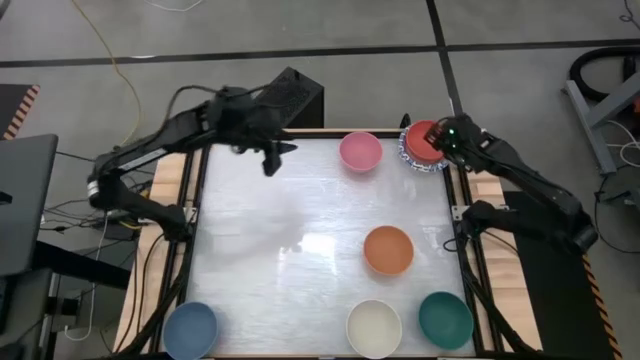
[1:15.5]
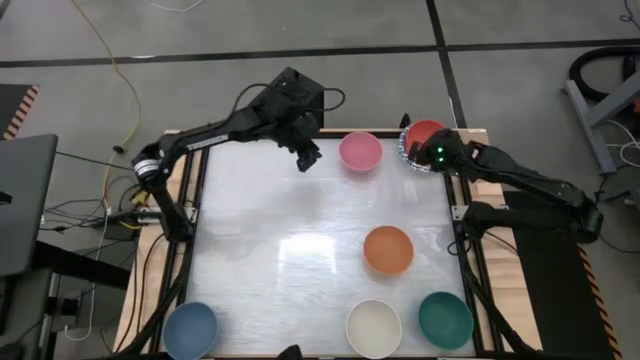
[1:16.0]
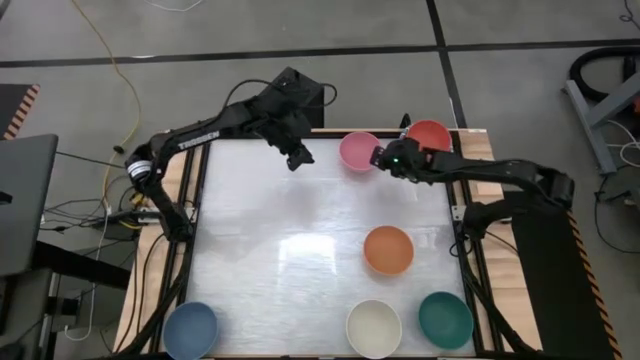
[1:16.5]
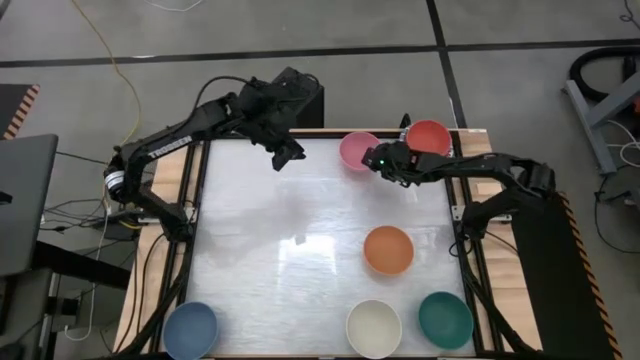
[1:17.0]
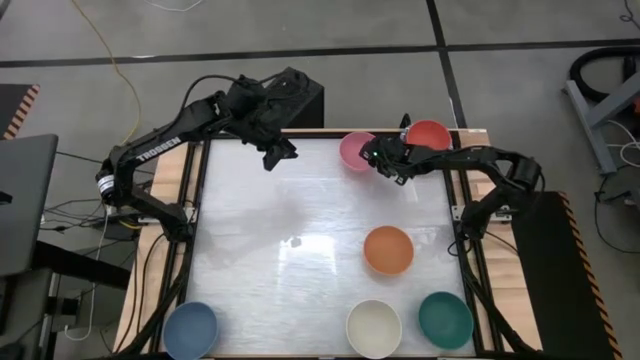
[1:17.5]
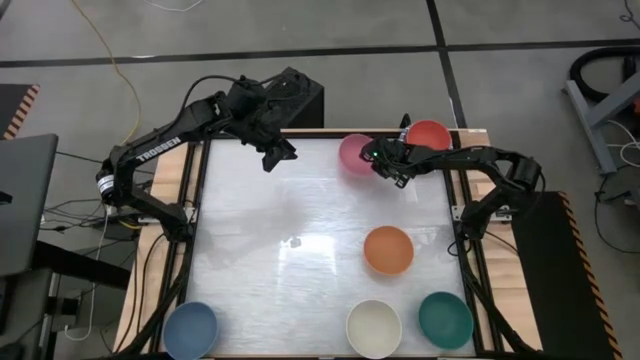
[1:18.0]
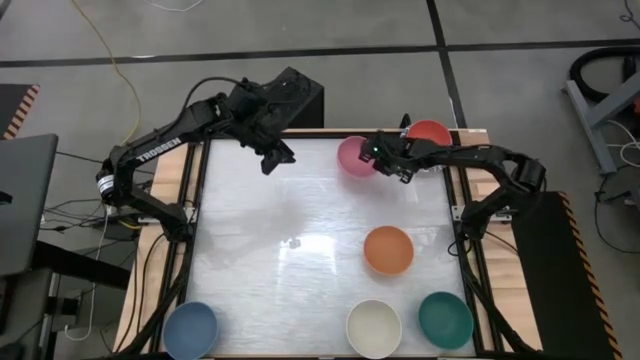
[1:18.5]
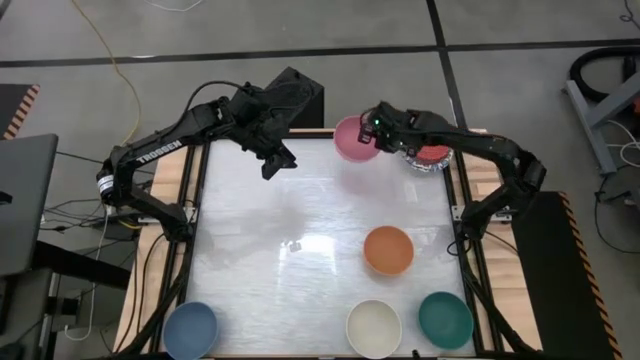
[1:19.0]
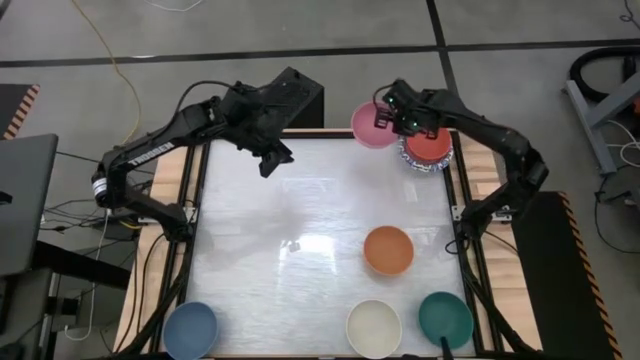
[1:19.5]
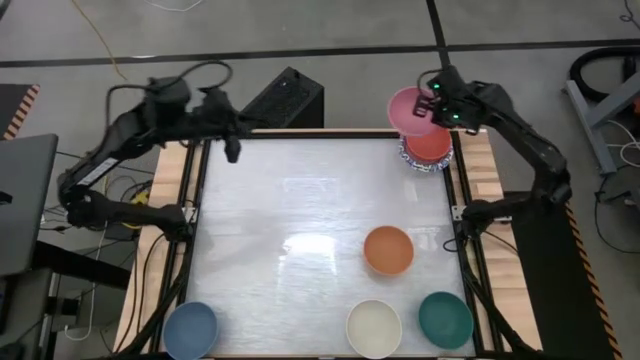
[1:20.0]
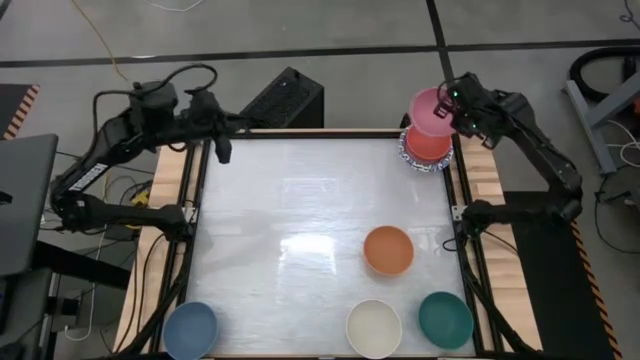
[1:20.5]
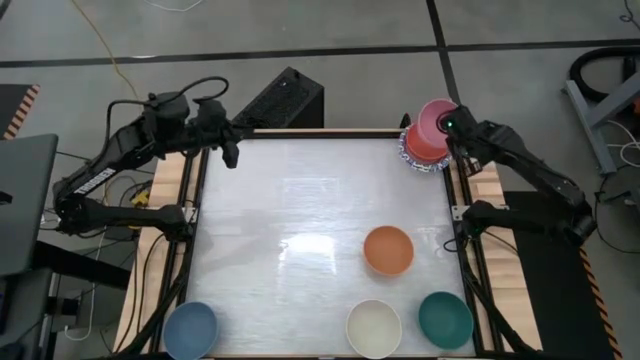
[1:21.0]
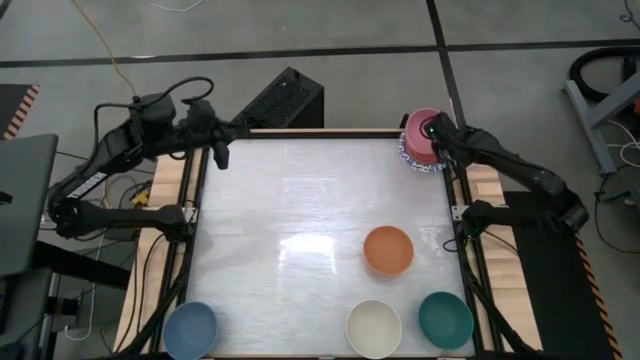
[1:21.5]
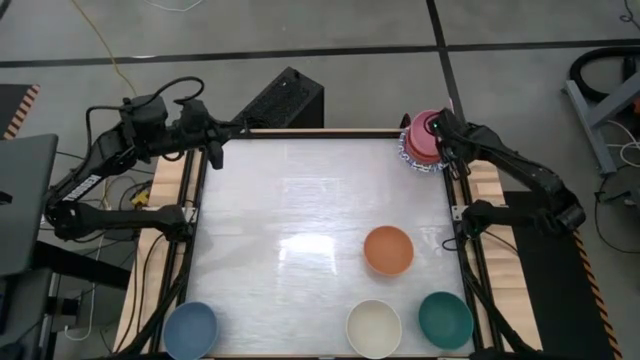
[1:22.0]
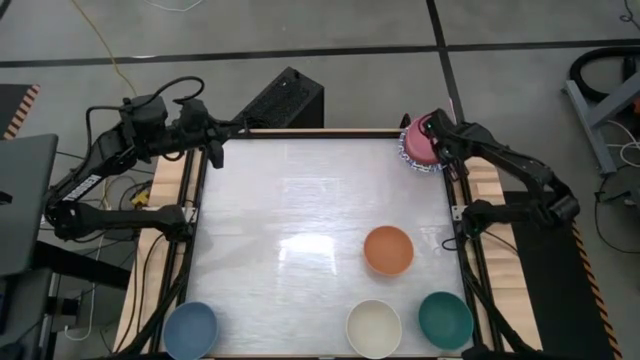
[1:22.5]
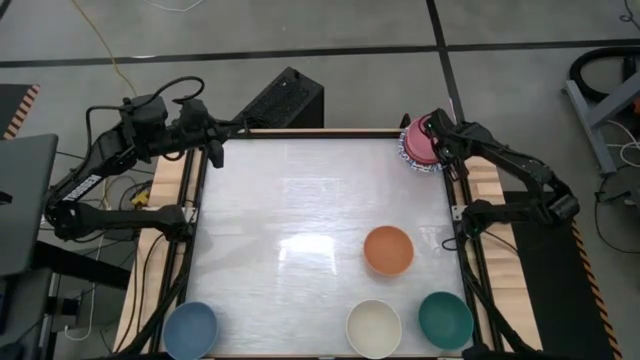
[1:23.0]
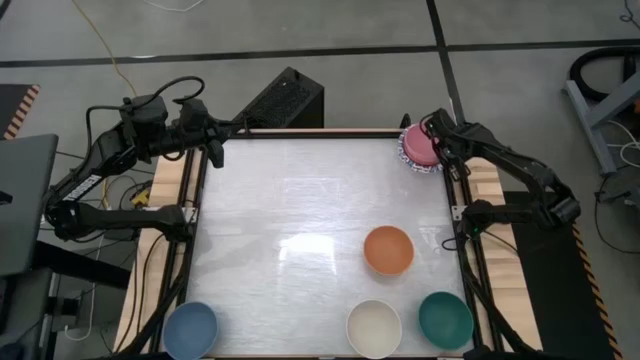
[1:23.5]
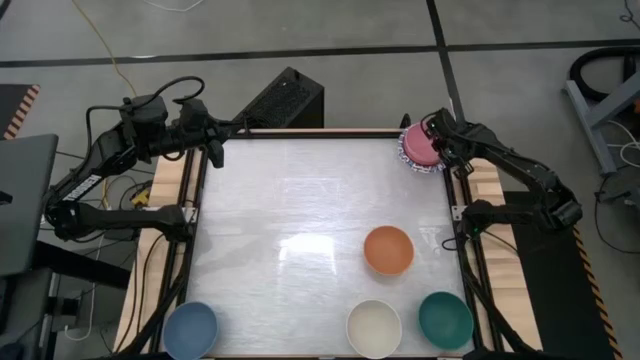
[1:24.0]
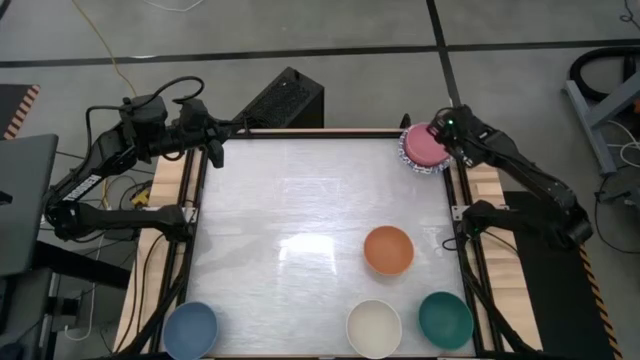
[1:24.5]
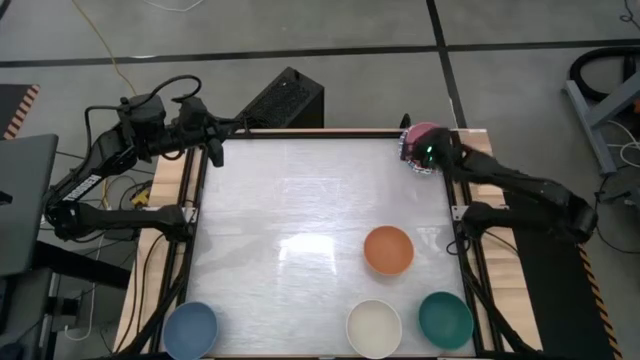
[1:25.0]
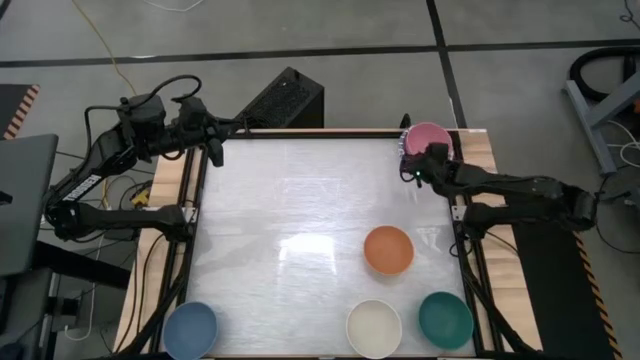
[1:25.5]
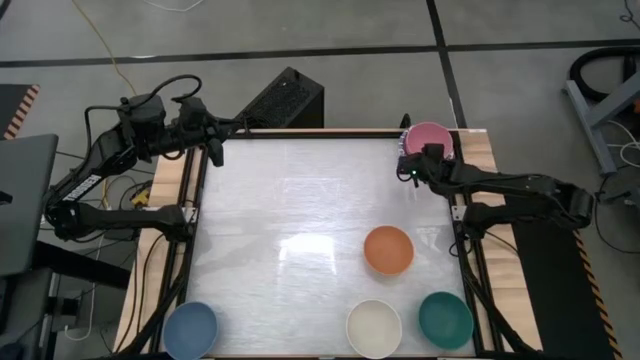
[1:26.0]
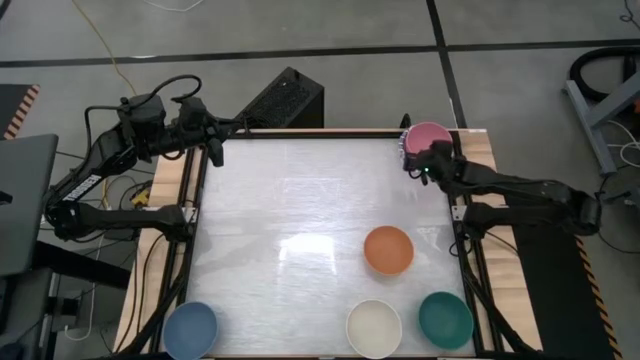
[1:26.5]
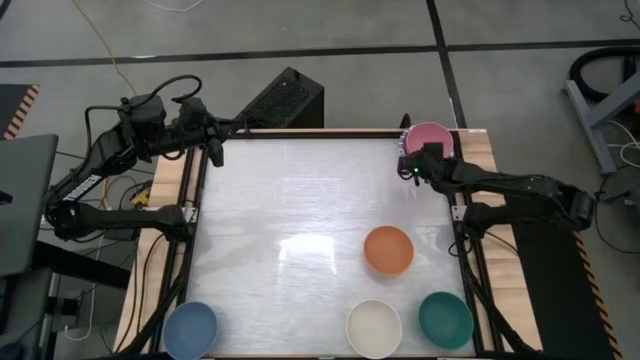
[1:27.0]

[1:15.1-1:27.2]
Stack the pink bowl on top of the orange bowl

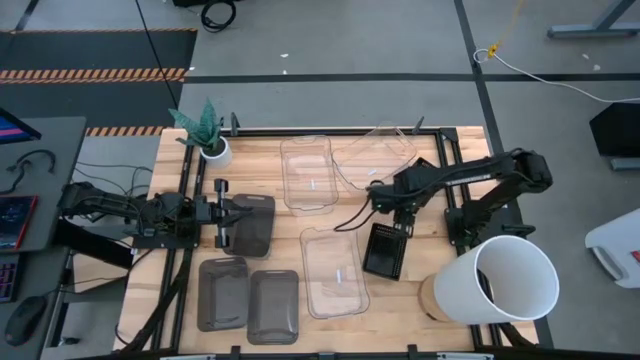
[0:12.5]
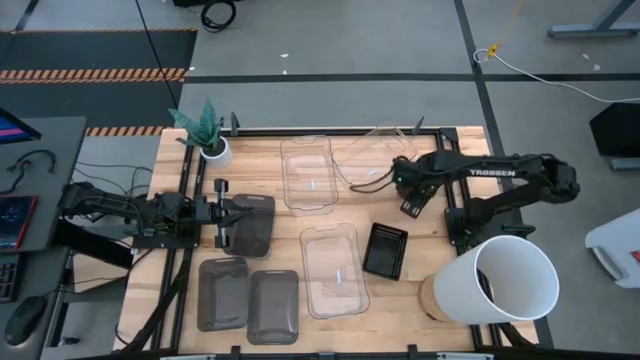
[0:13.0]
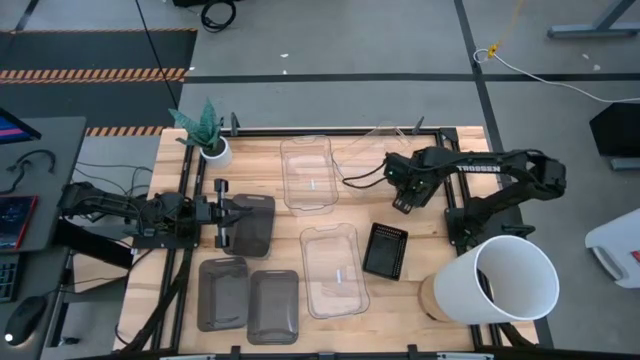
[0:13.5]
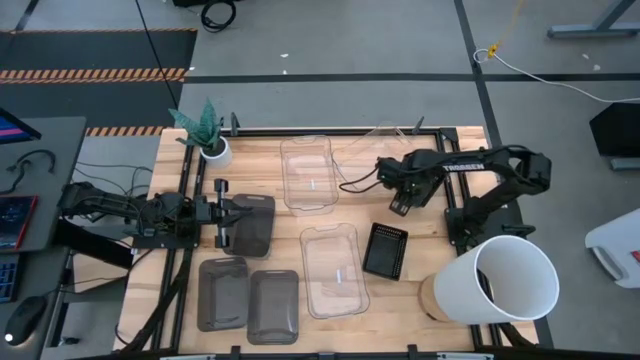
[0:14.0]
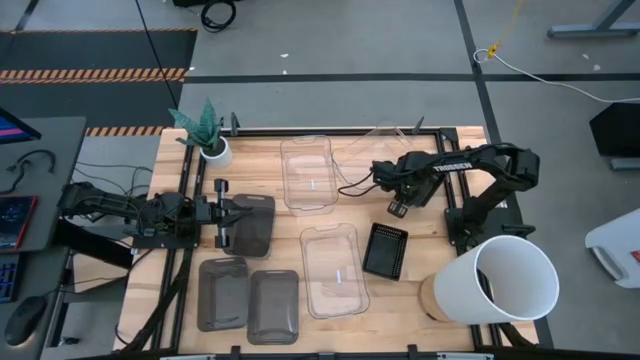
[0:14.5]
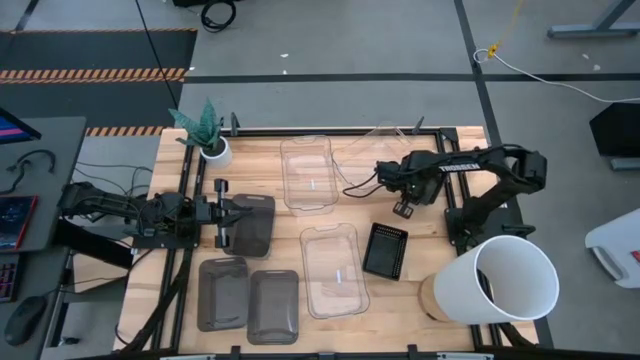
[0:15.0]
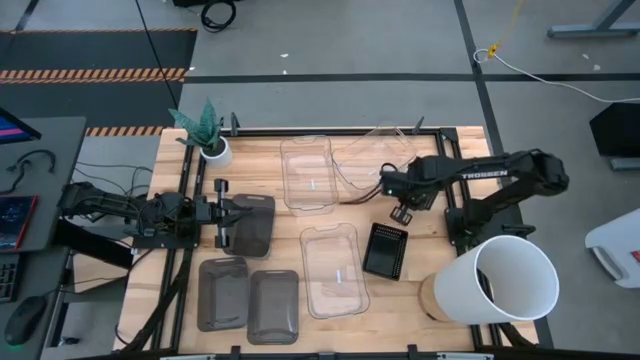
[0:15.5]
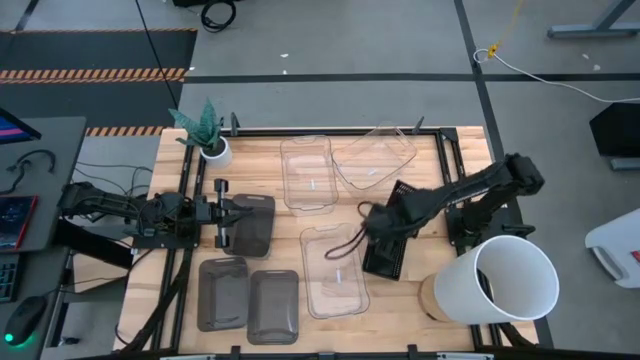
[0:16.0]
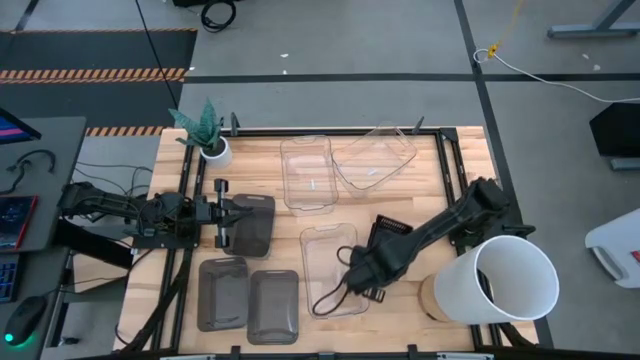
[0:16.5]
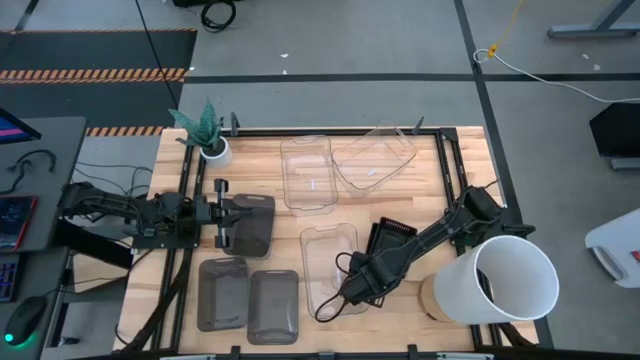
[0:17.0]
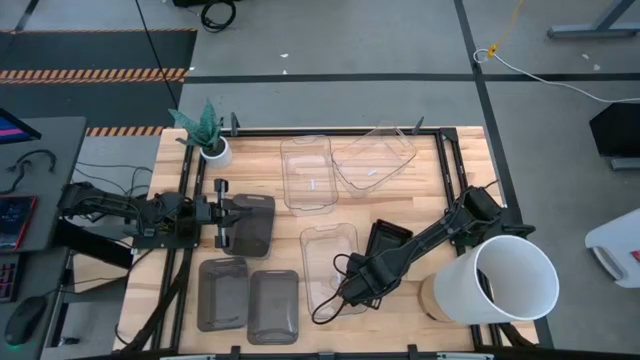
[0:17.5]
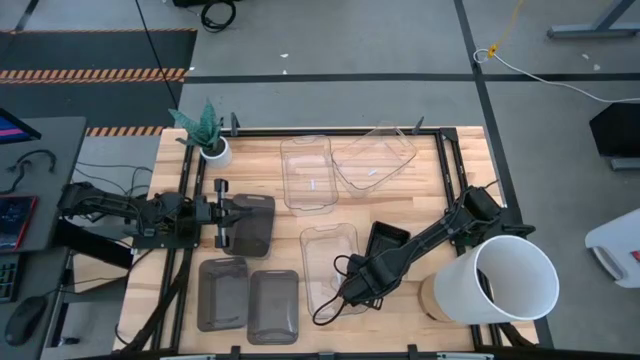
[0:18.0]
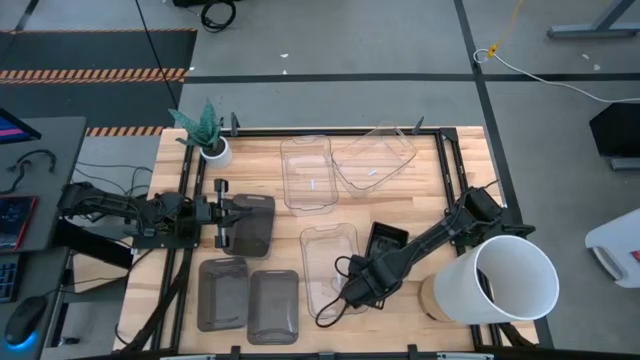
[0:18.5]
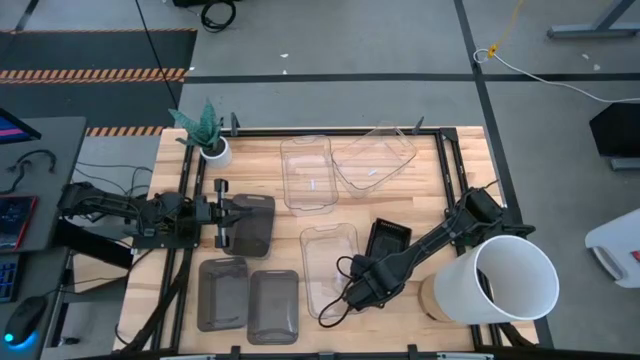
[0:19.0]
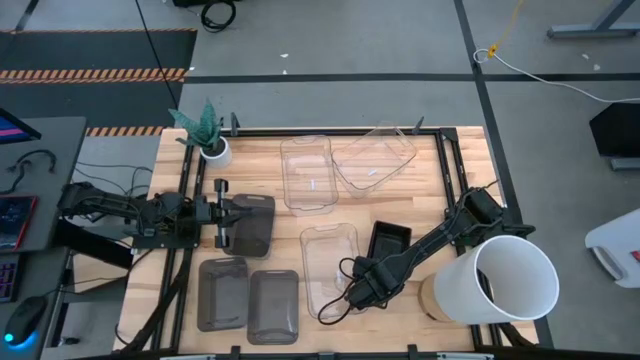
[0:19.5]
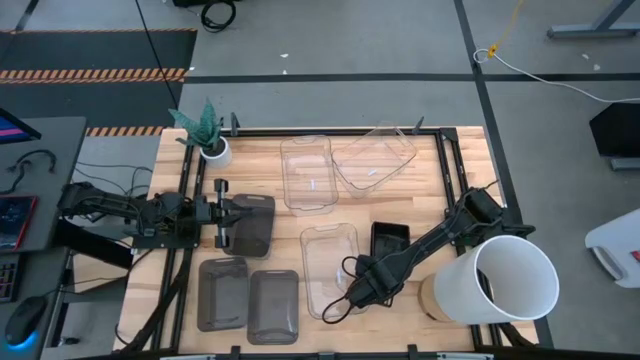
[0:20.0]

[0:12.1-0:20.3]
Stack the top black bin on the bottom black bins
